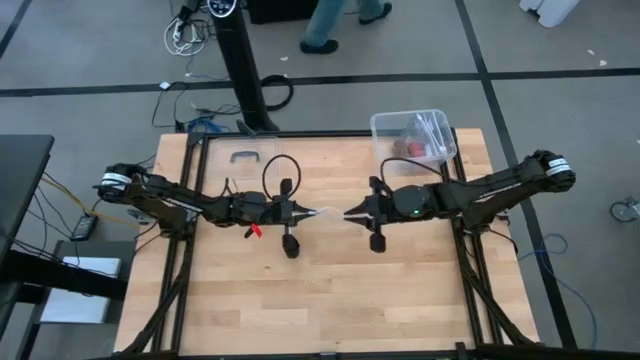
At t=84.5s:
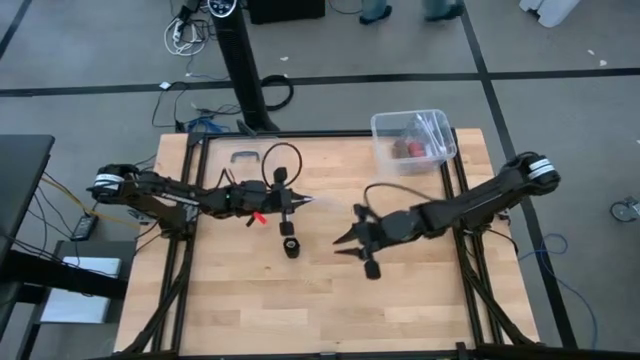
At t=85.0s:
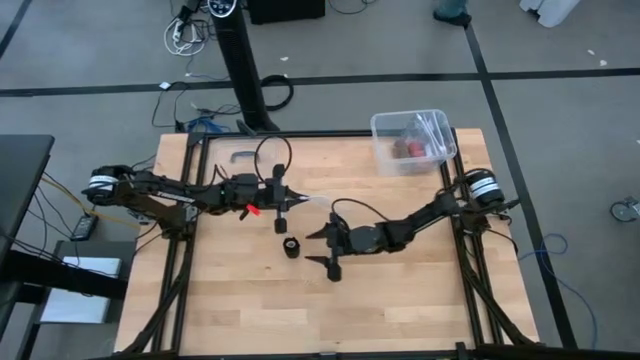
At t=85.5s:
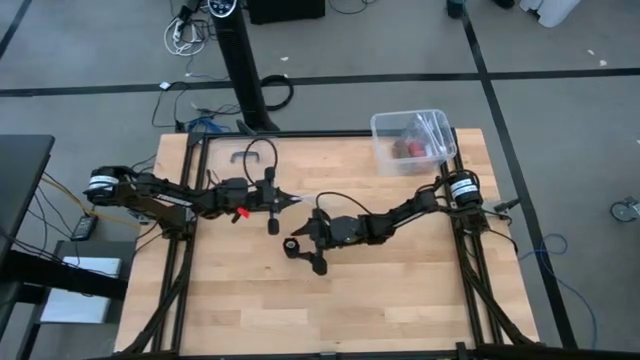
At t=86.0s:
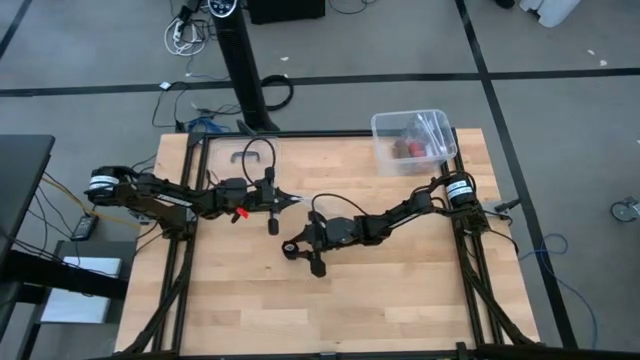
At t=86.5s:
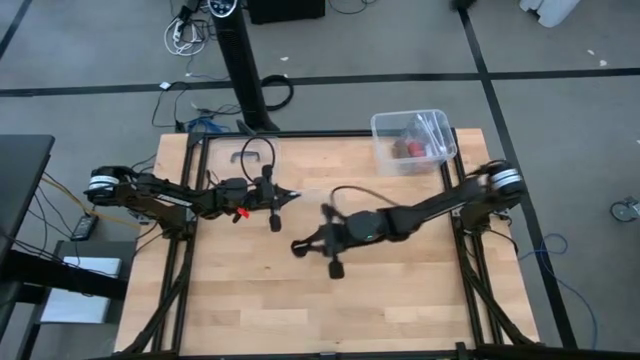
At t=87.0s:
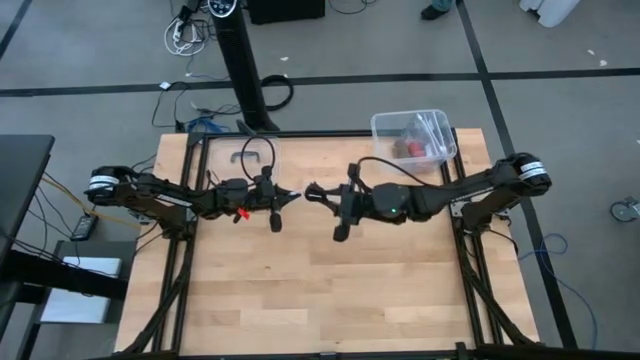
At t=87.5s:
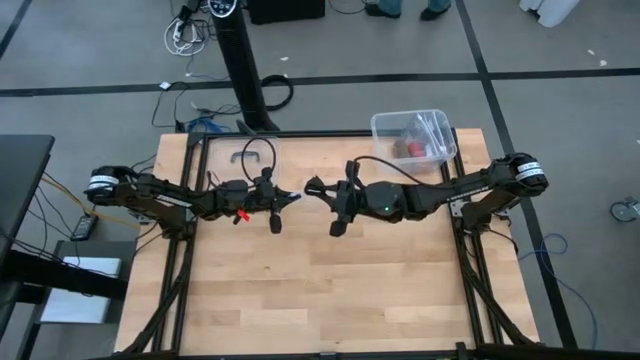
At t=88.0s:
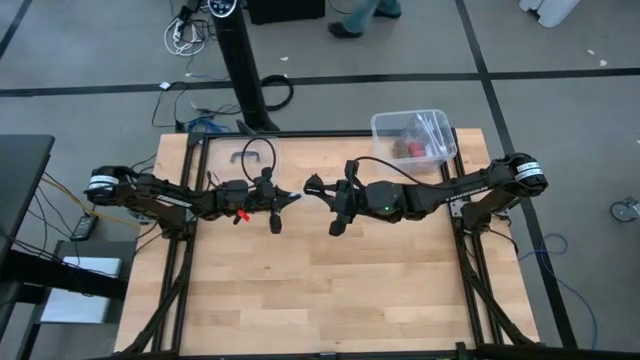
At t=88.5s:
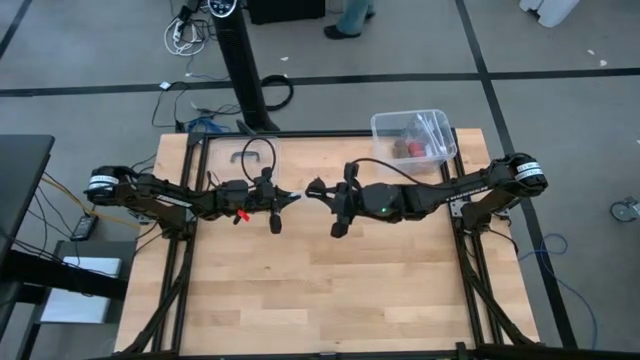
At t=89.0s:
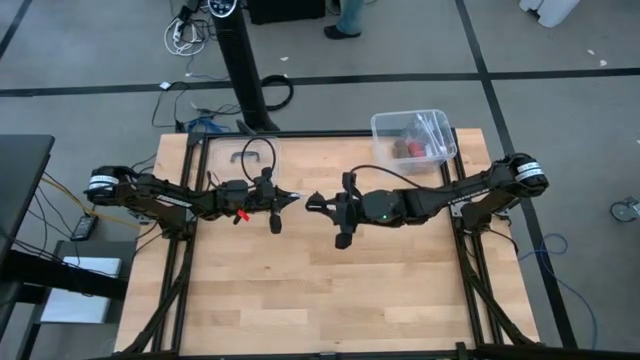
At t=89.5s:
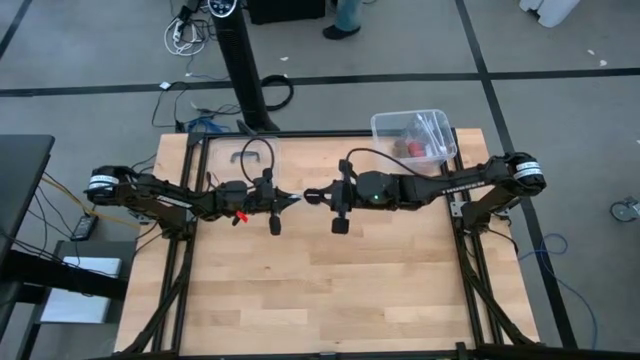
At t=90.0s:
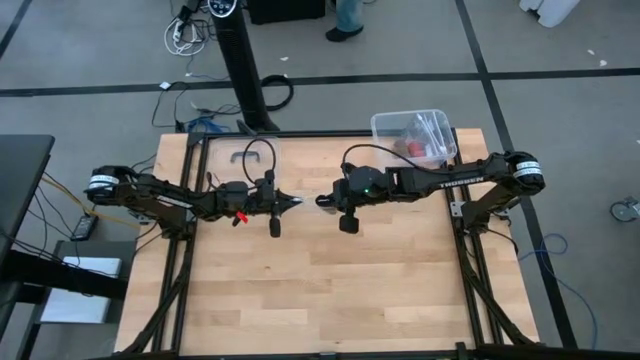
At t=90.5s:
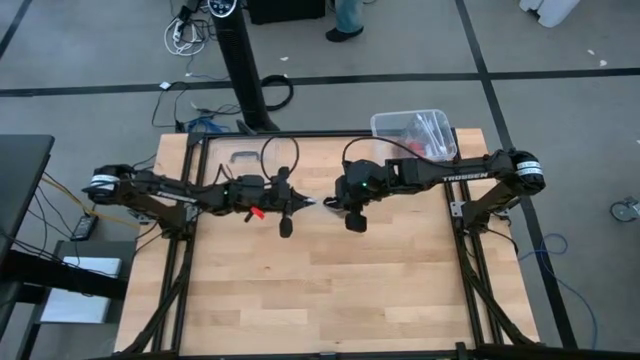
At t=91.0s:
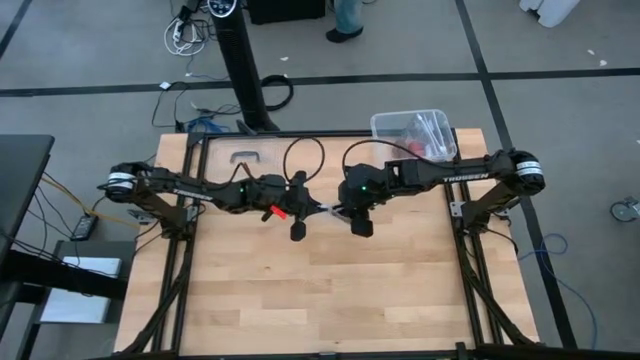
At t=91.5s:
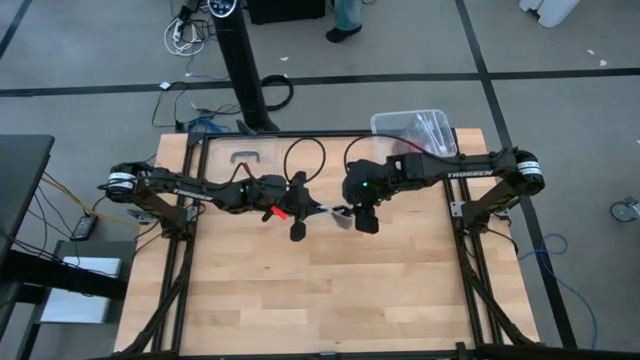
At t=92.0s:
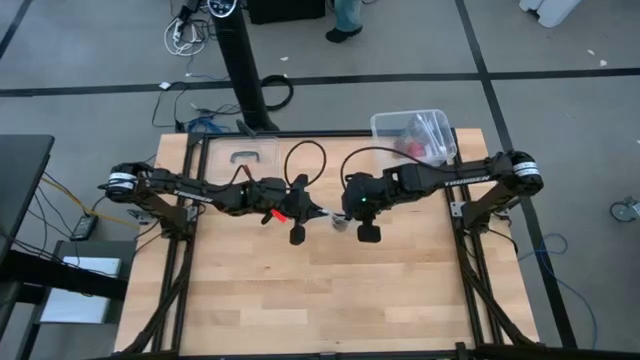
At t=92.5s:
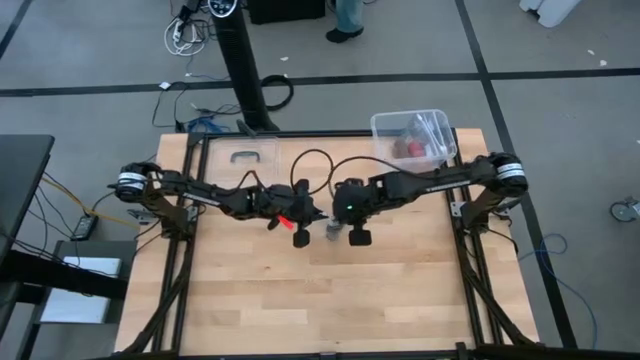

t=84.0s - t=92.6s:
Task: Roll bandage
Put the black bandage into the transparent zip bag

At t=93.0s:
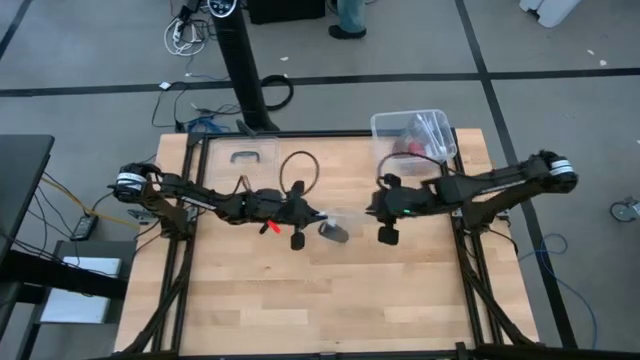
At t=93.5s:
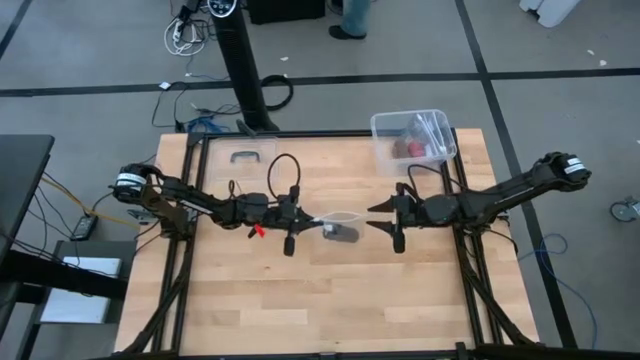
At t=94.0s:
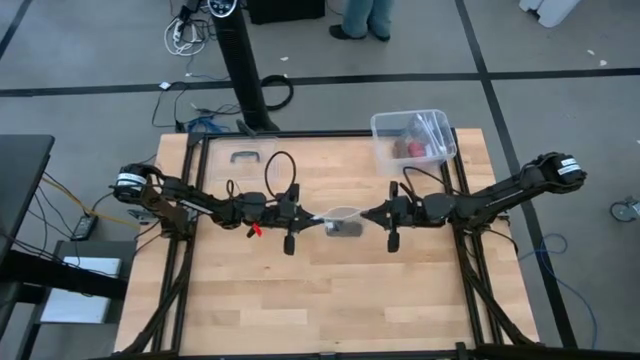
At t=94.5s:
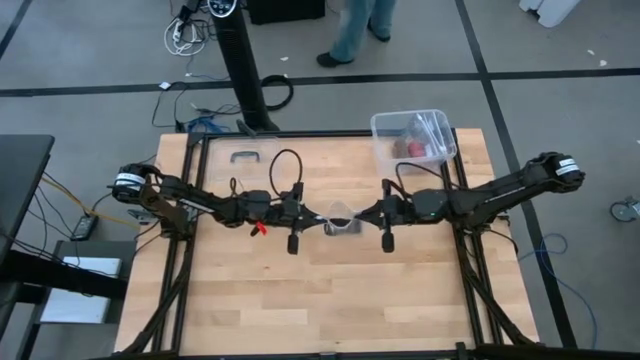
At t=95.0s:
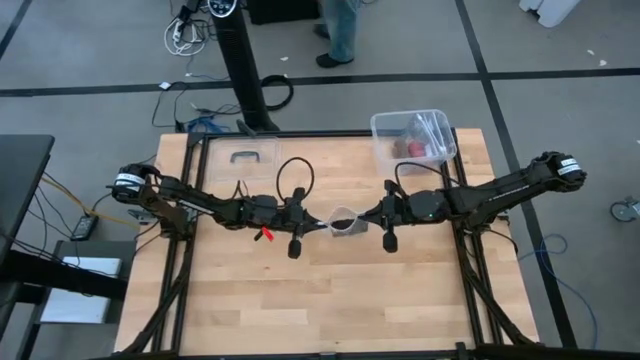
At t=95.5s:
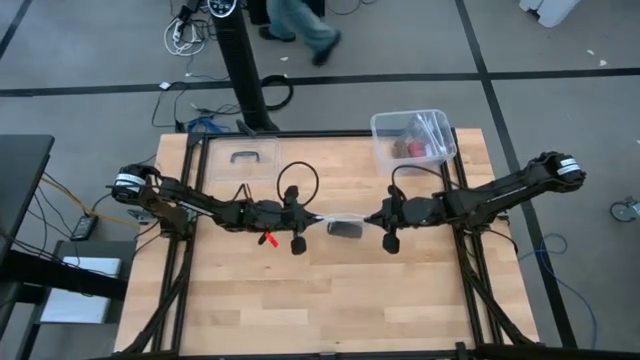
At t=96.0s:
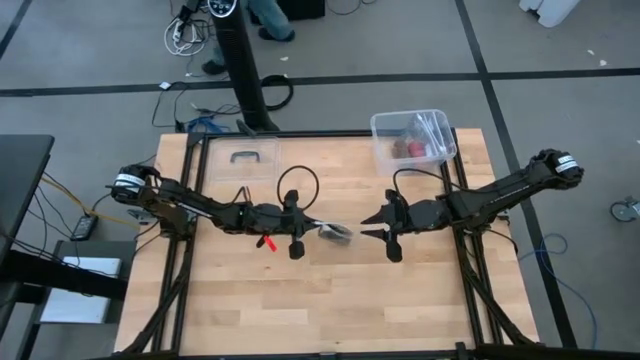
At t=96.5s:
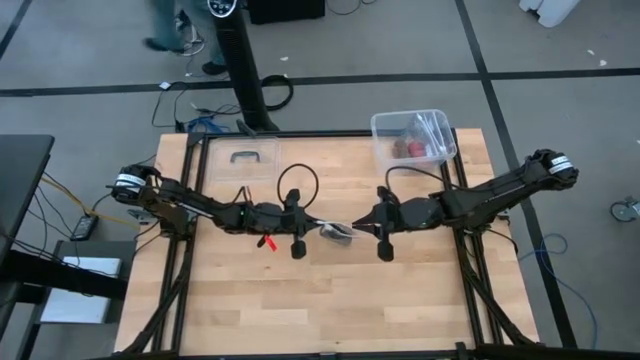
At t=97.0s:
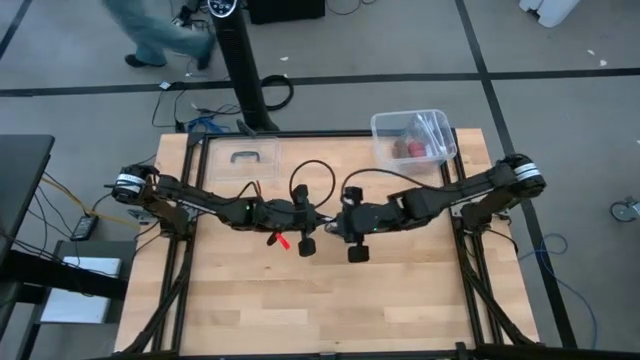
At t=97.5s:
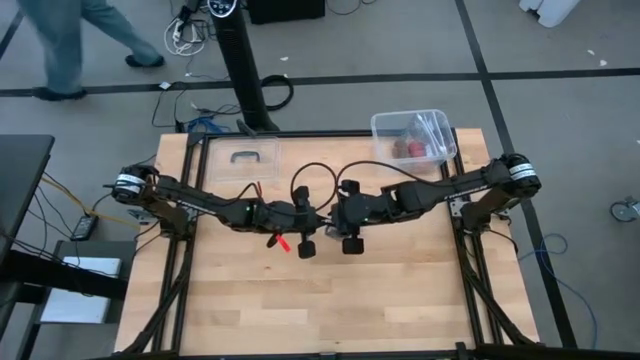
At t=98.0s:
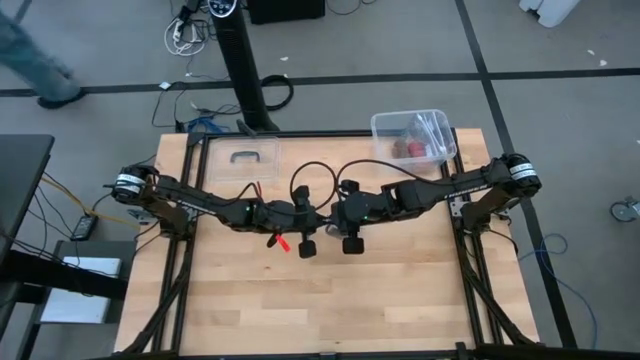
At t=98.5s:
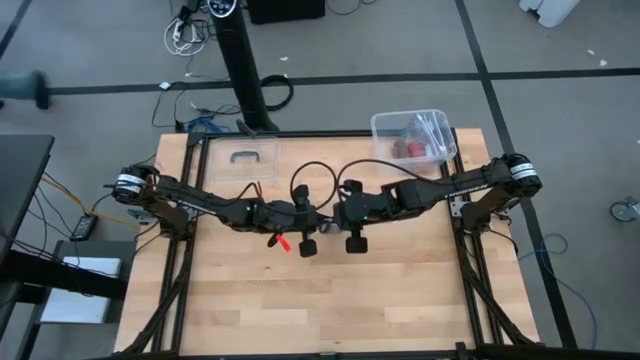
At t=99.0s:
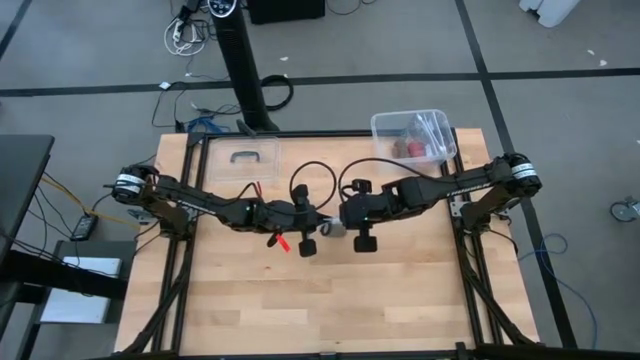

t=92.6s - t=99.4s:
Close the transparent zip bag

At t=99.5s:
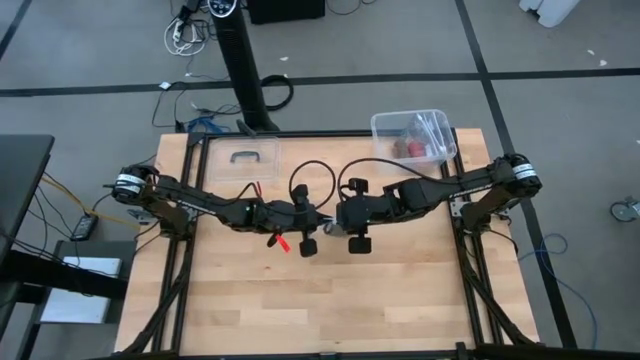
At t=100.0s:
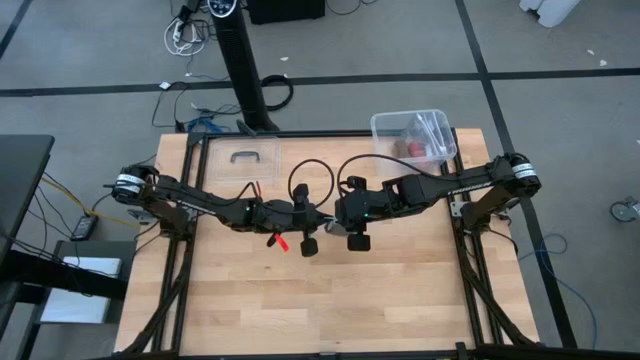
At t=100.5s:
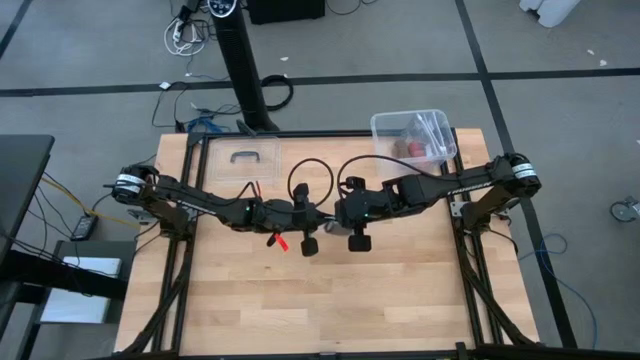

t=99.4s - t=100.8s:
Close the transparent zip bag

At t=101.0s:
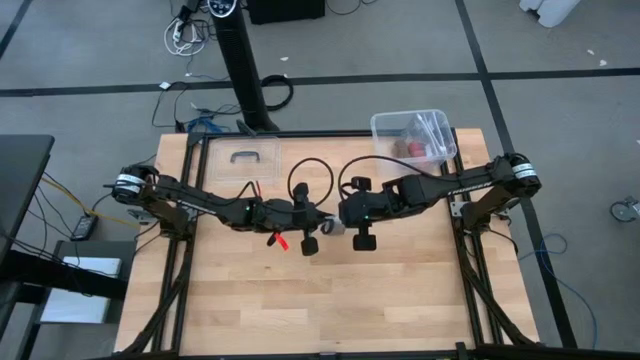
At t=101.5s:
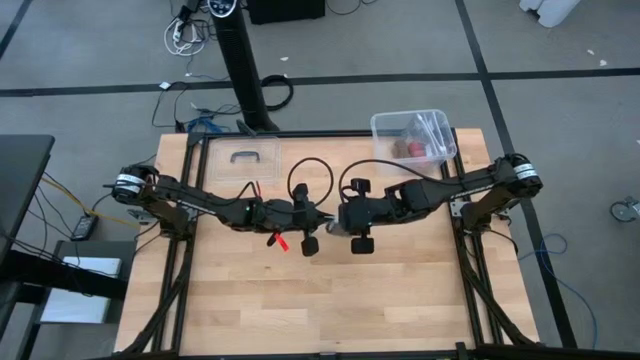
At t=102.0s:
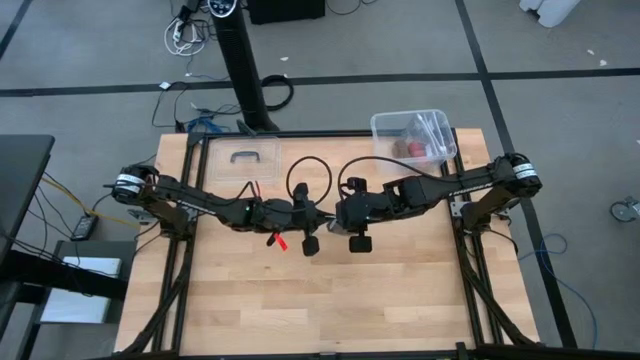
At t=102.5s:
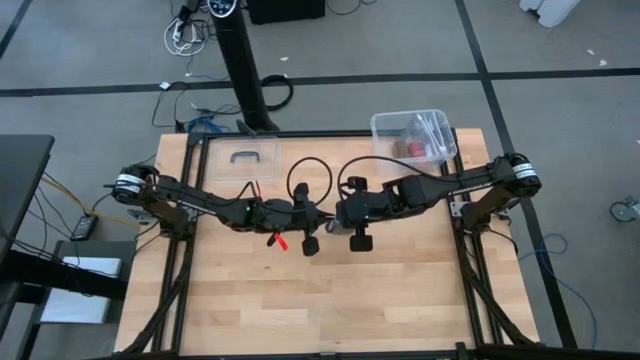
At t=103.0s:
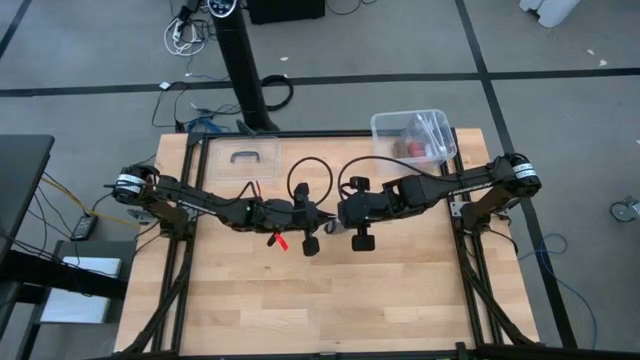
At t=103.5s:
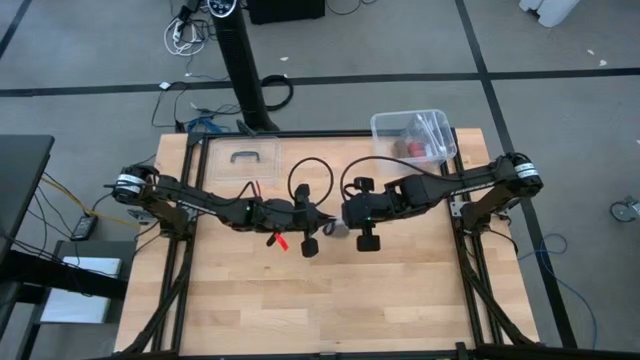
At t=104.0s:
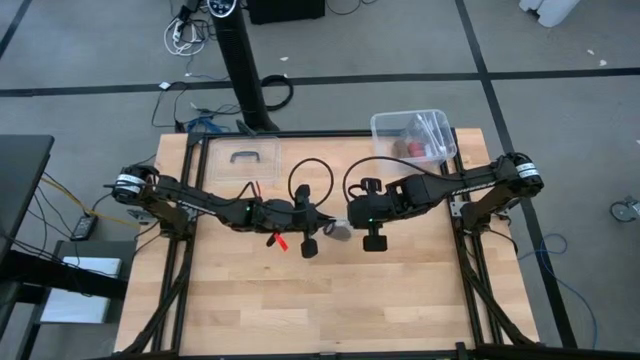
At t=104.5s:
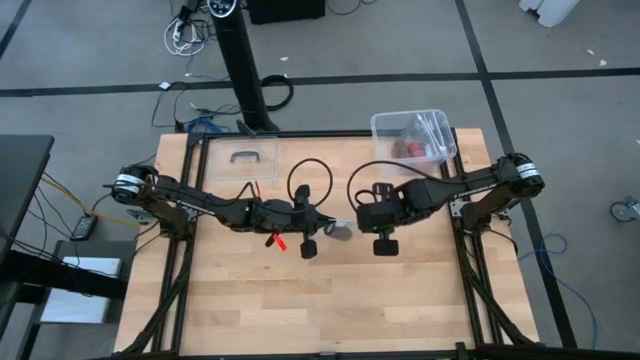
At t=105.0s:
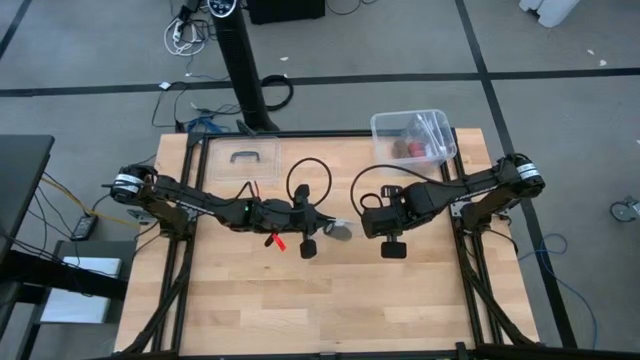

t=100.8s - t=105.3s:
Close the transparent zip bag
